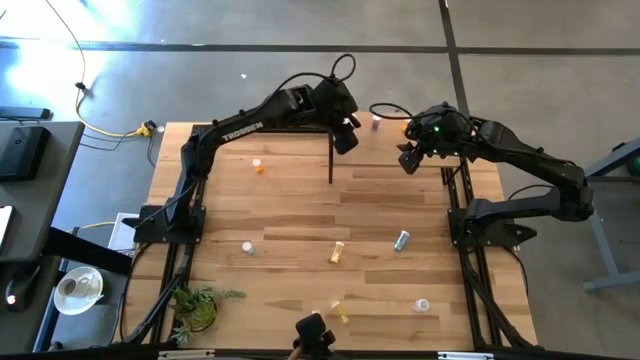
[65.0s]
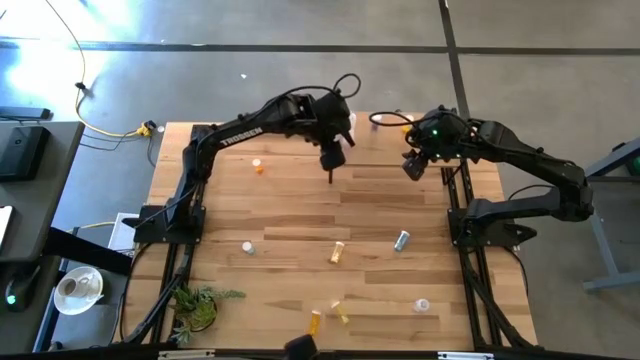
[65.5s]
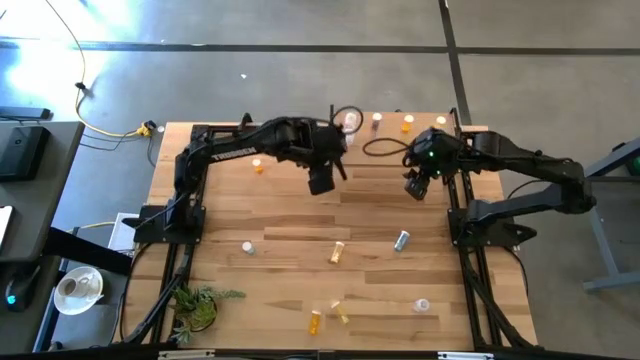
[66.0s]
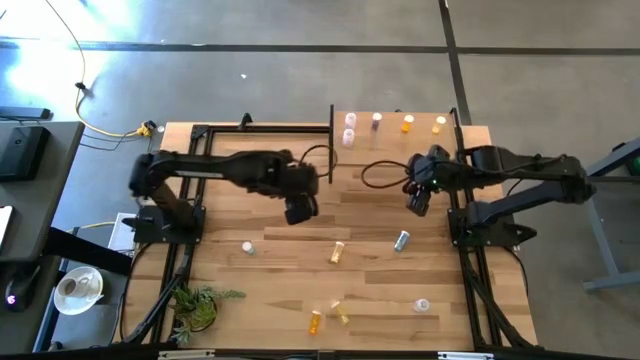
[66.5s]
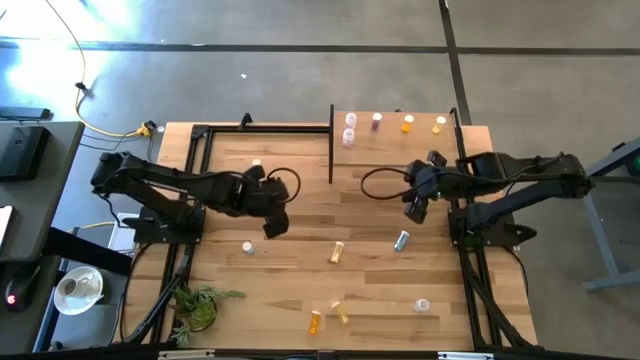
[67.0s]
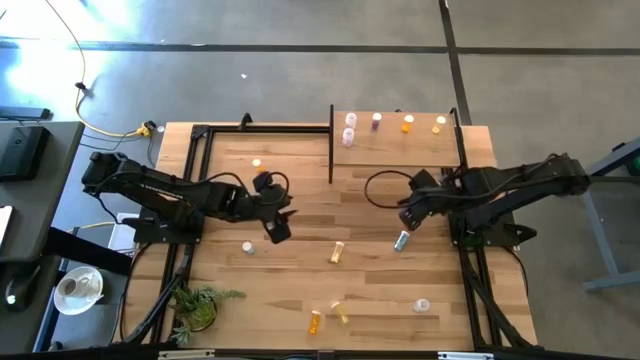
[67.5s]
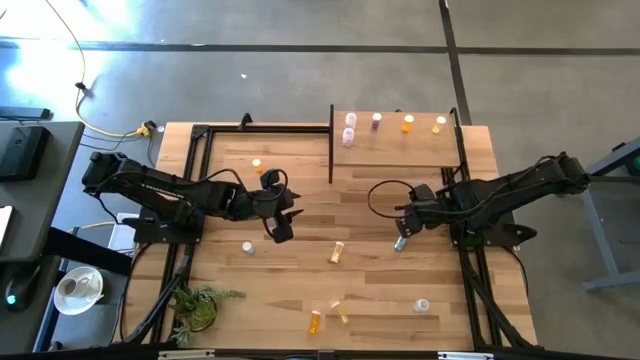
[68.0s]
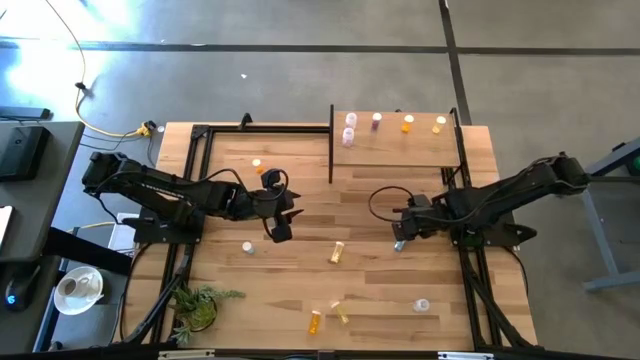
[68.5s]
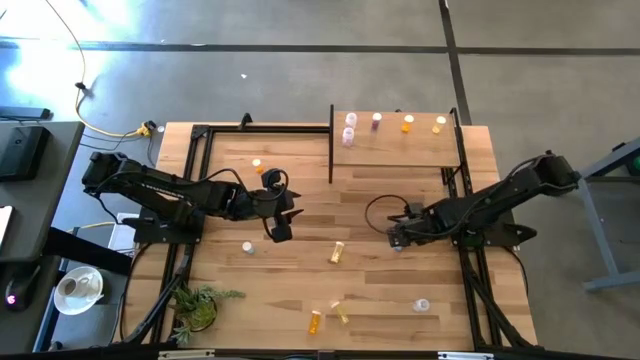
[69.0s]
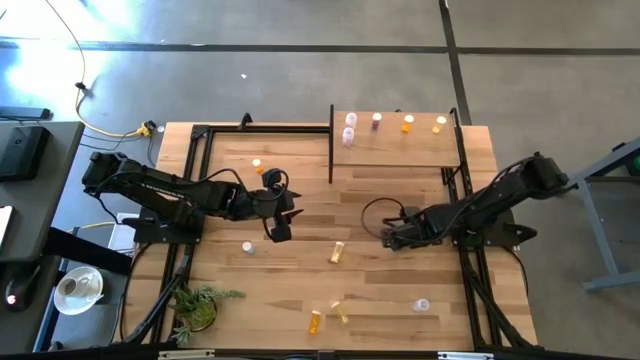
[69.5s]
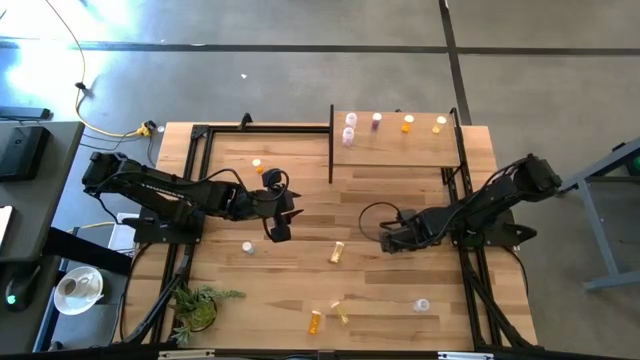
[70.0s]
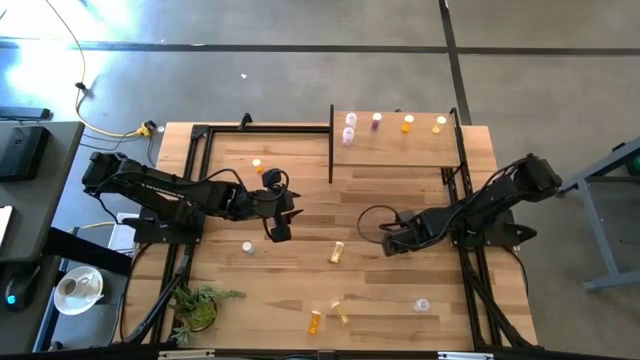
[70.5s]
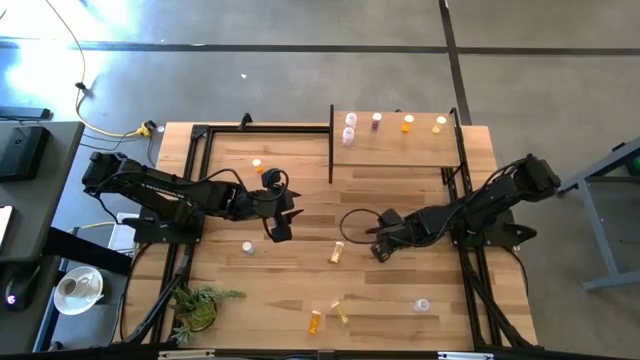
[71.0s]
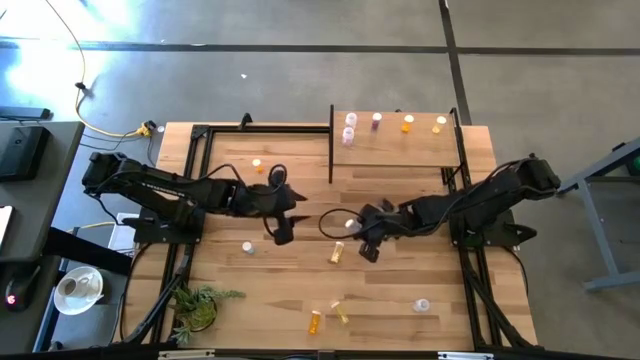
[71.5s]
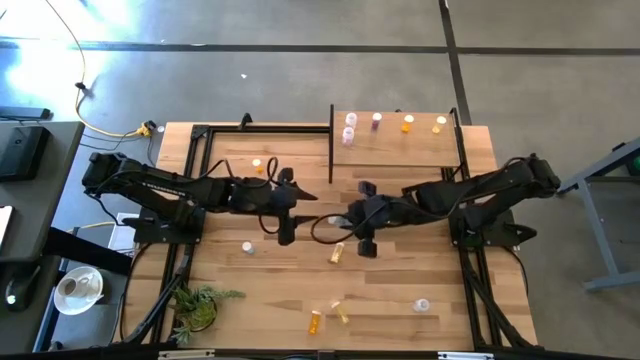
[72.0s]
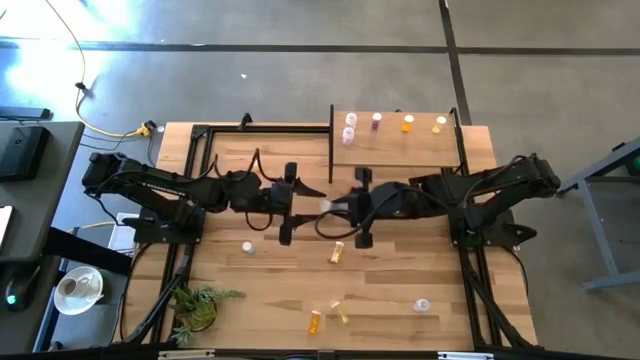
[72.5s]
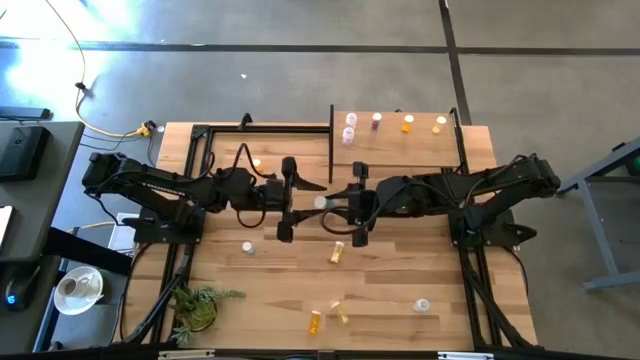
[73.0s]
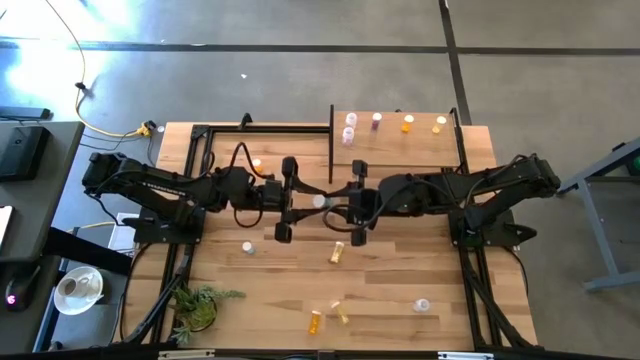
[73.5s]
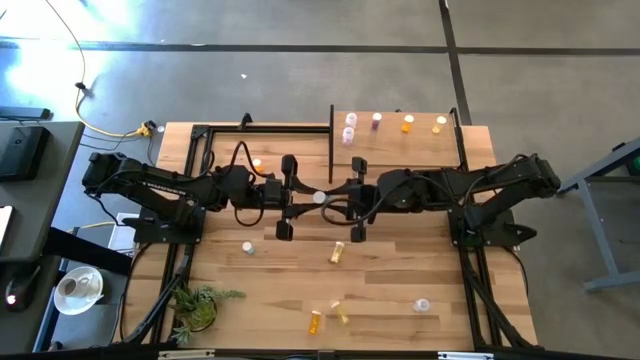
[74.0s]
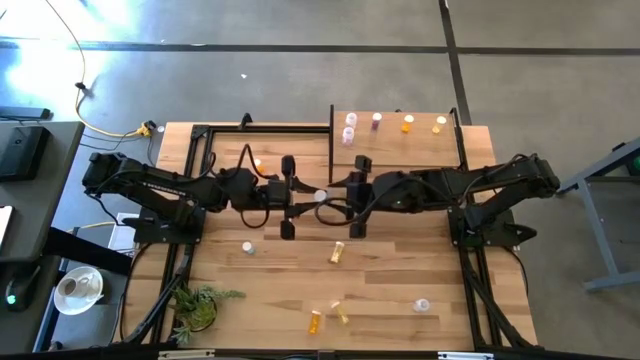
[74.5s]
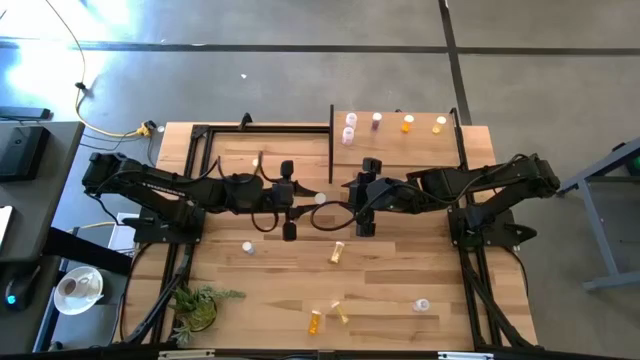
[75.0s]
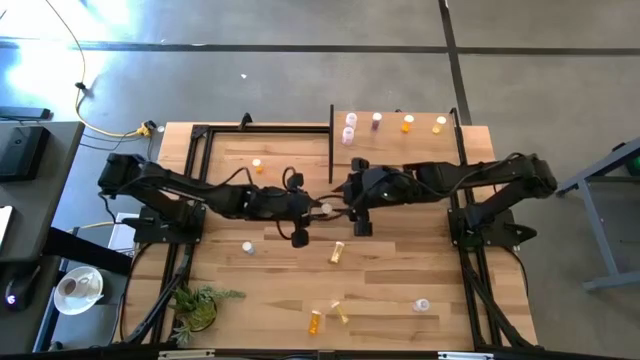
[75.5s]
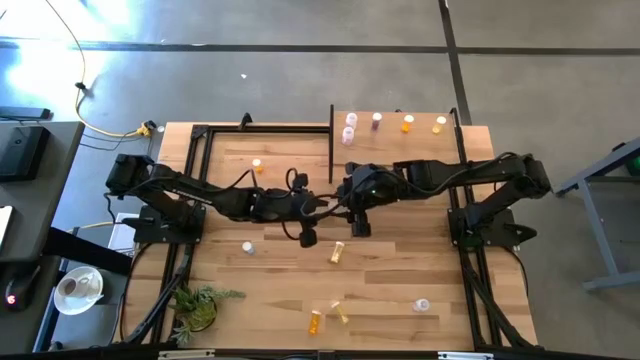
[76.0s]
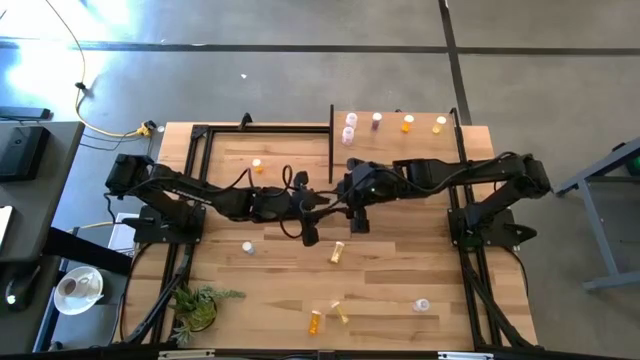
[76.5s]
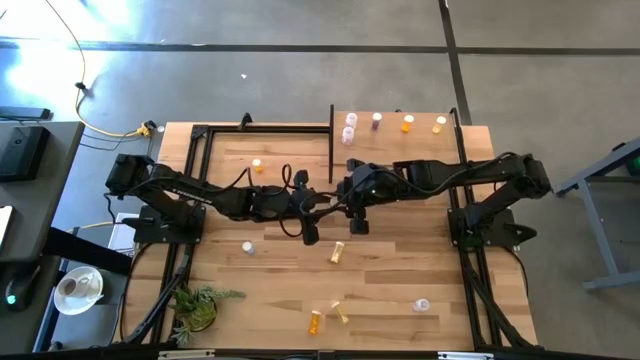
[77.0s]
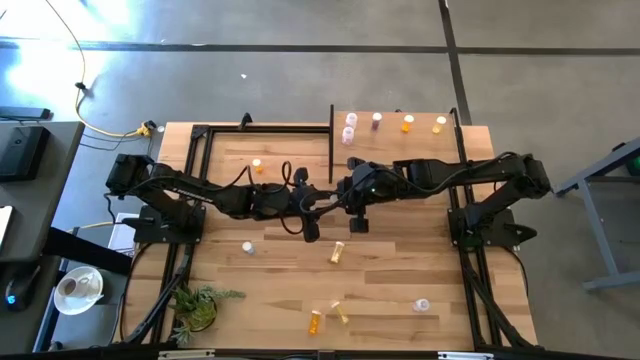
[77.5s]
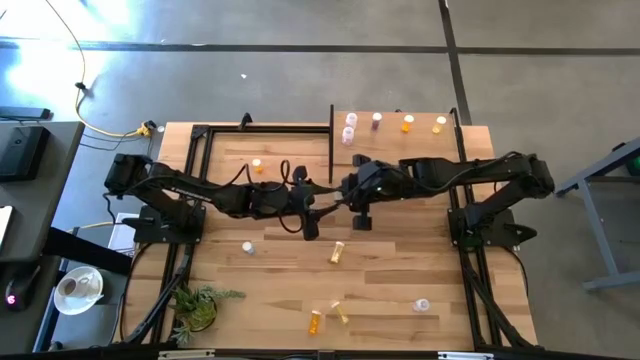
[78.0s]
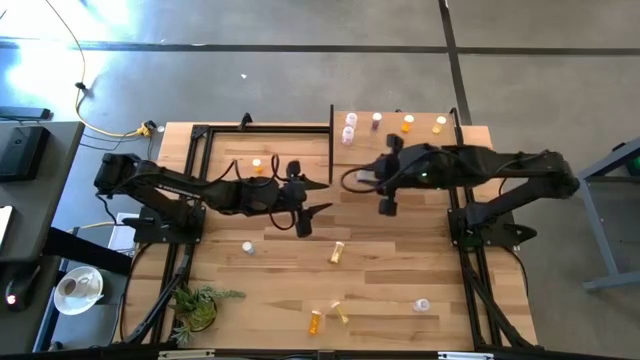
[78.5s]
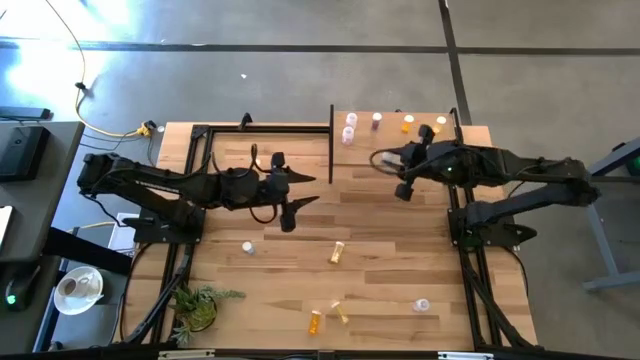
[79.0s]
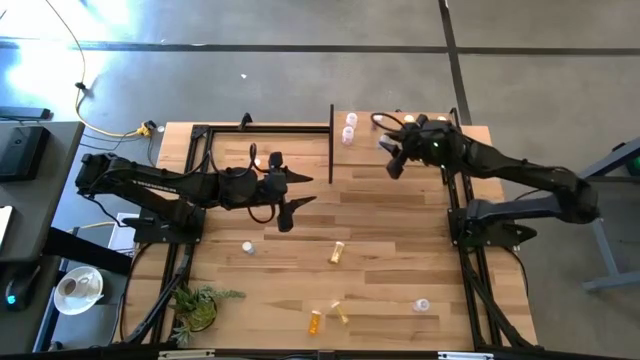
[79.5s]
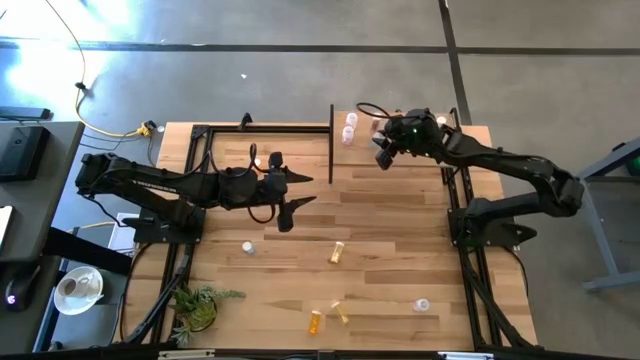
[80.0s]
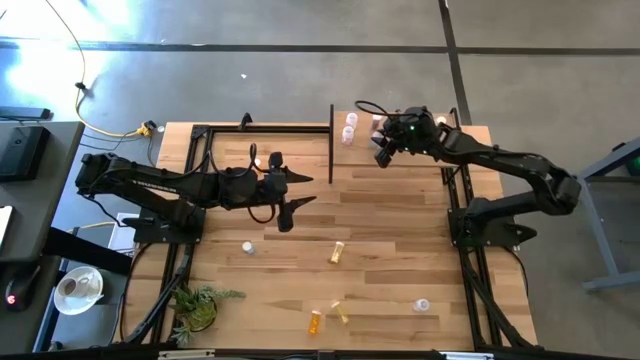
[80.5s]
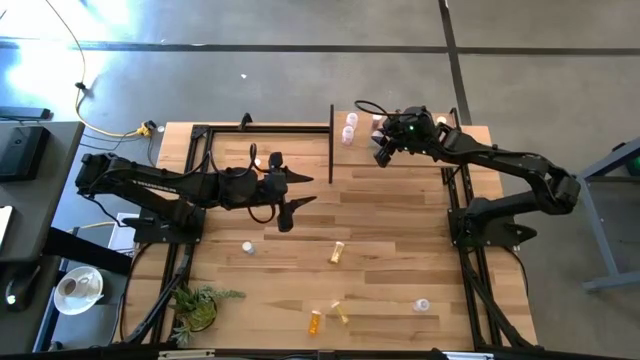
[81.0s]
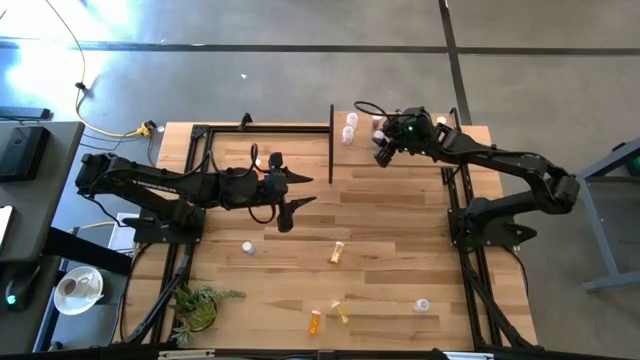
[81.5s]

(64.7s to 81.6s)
Task: Pick and place medicine bottles onto shelf by color
Put the right blue pill bottle on the shelf aligned with the other blue pill bottle

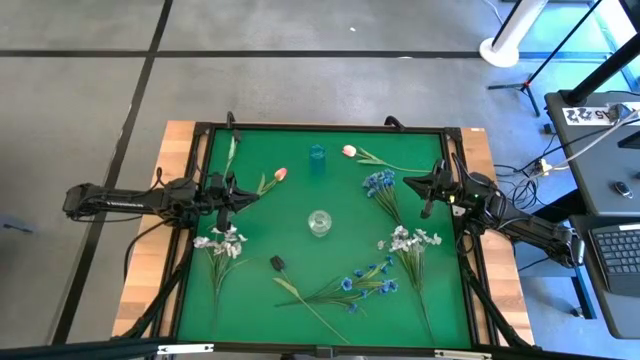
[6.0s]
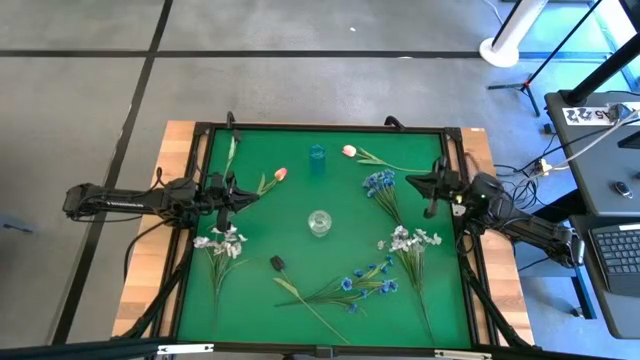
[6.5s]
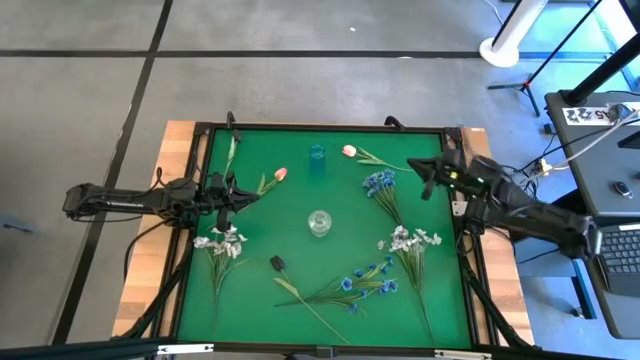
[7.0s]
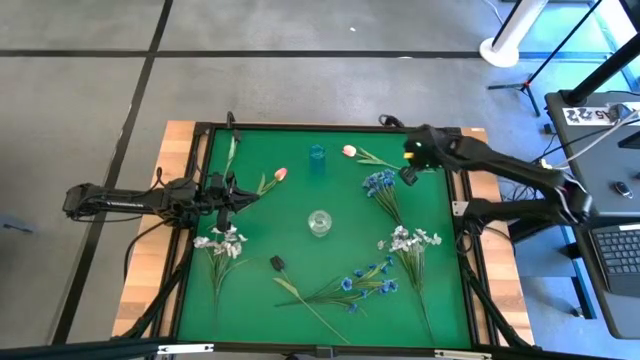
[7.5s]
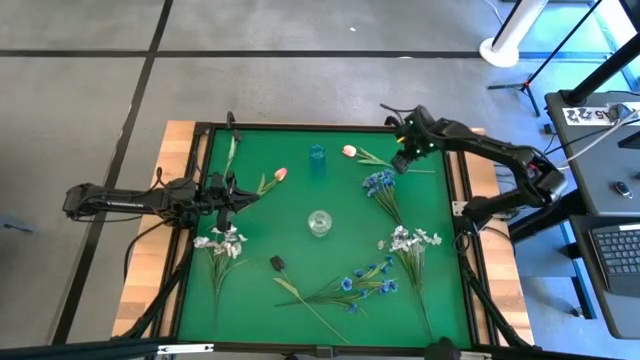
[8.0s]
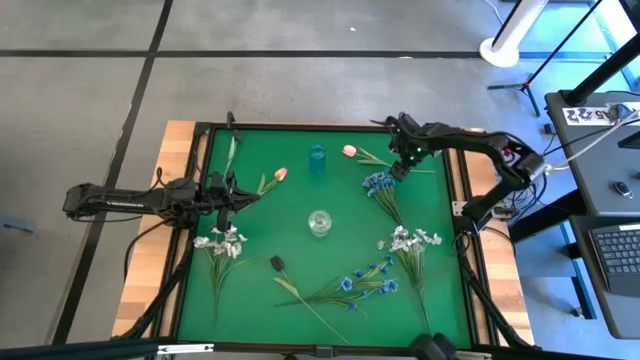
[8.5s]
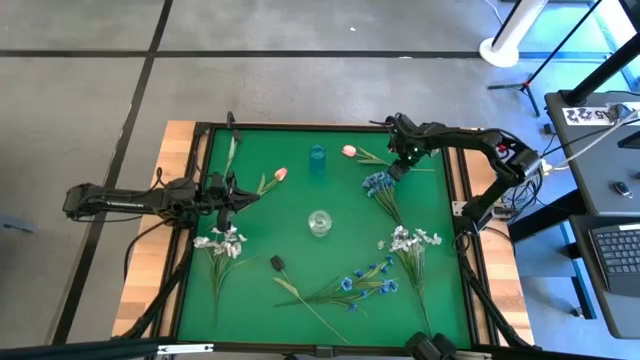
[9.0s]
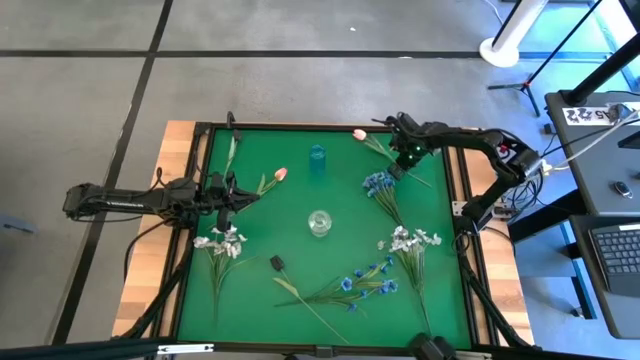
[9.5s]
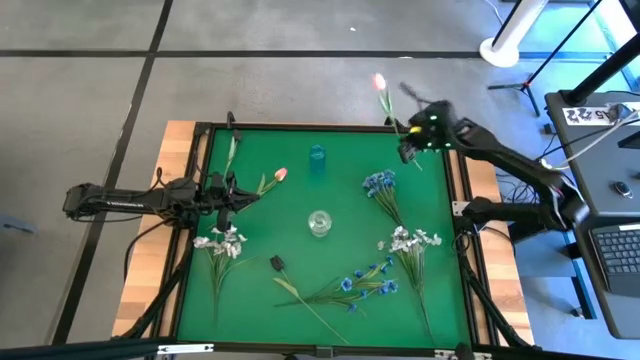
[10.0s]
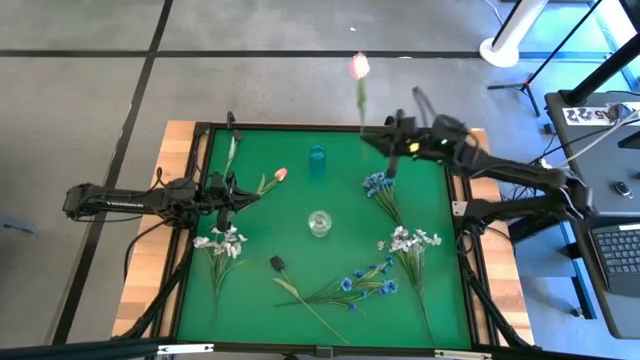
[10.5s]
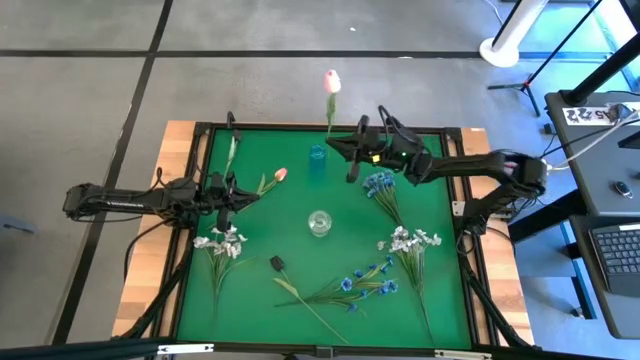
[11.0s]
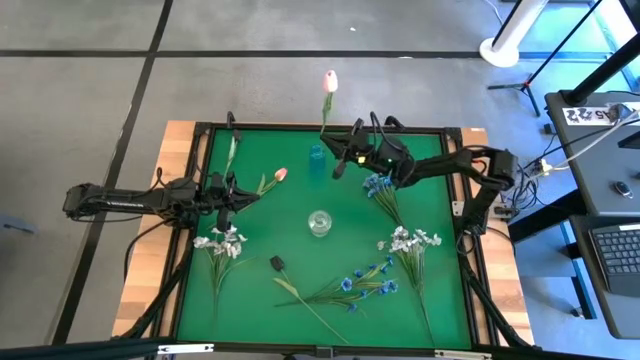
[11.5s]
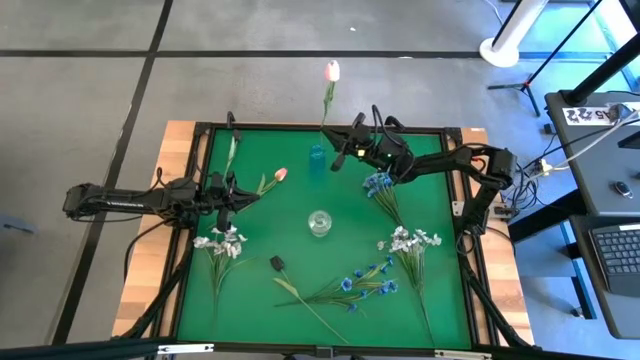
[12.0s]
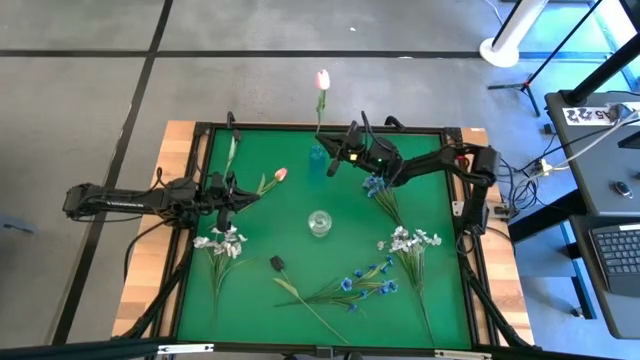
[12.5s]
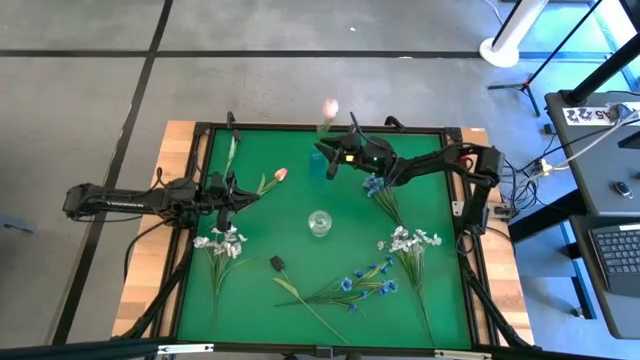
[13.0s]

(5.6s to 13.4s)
Task: Sort flowers into vase by color
Put the right pink tulip into the blue vase
